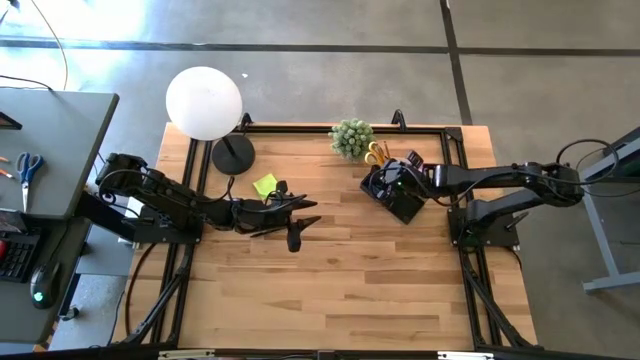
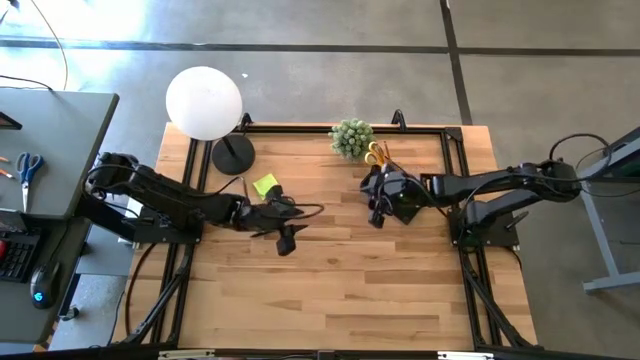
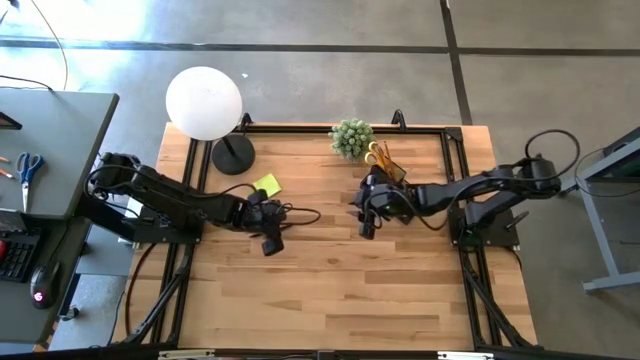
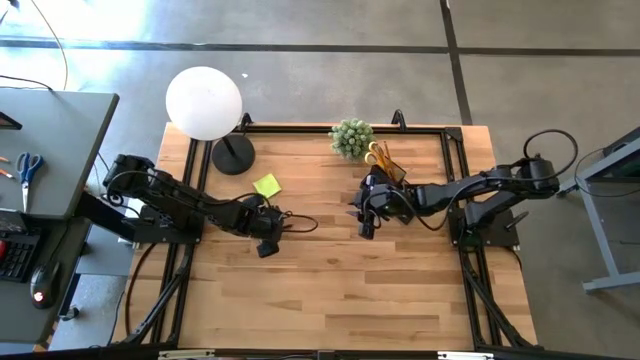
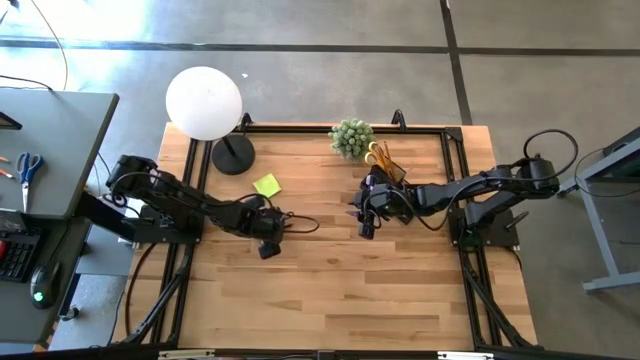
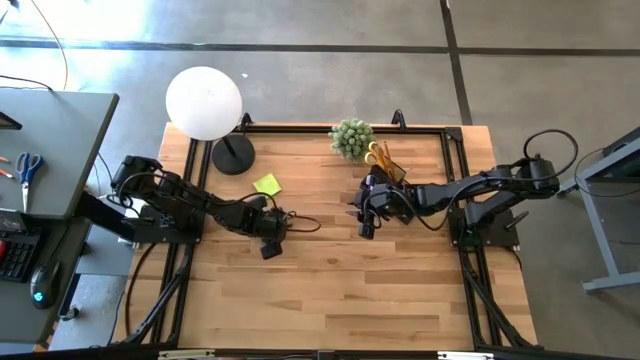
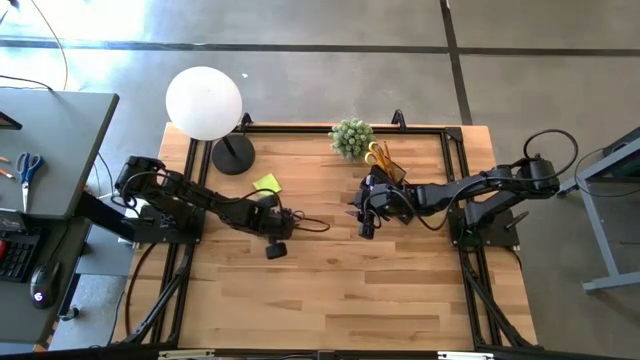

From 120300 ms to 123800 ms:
Task: Pick and place office supplies into organizer
Put the black pen into the desk organizer

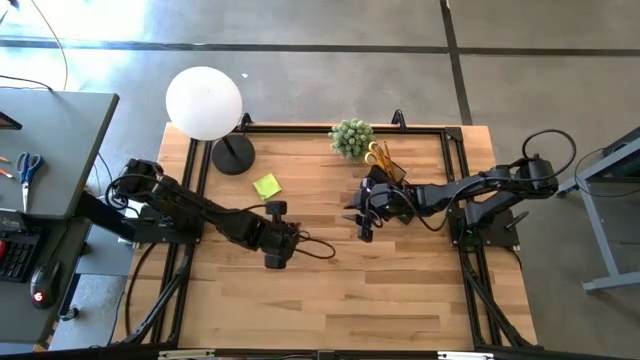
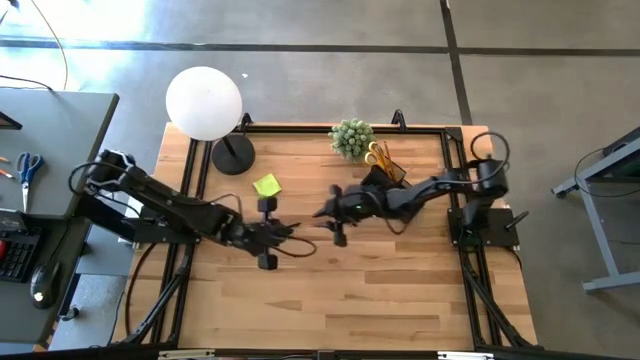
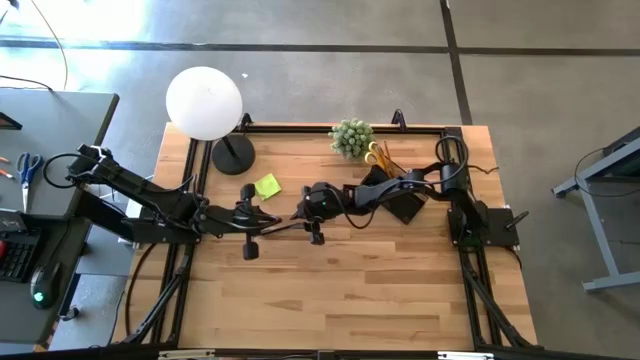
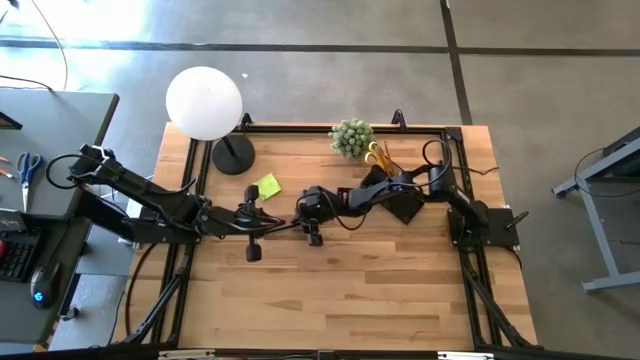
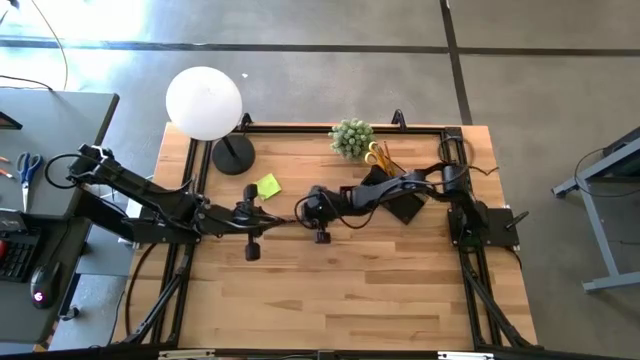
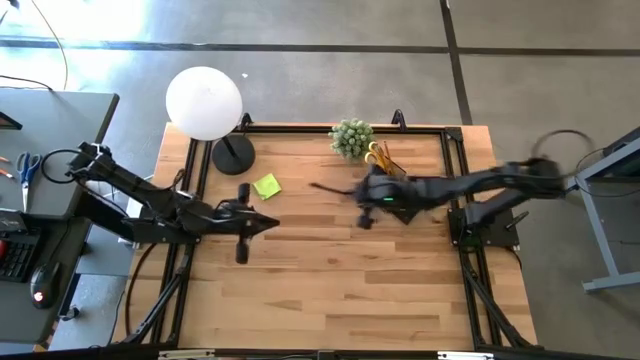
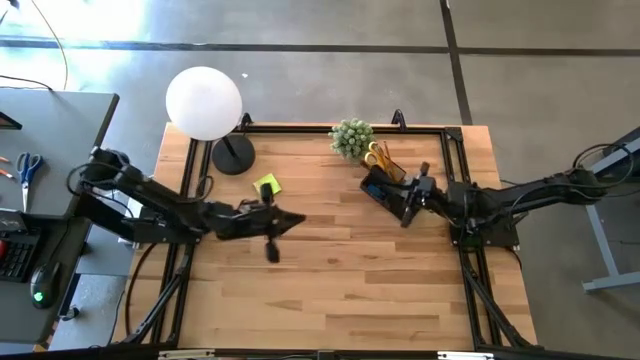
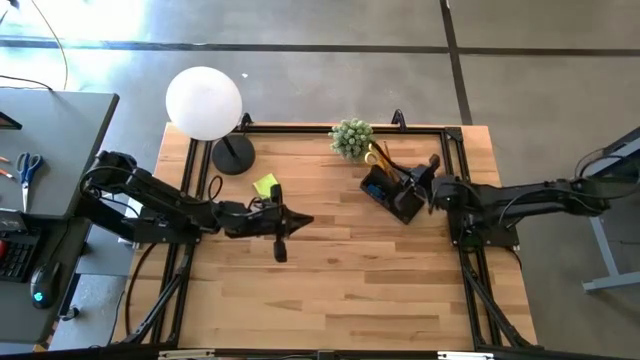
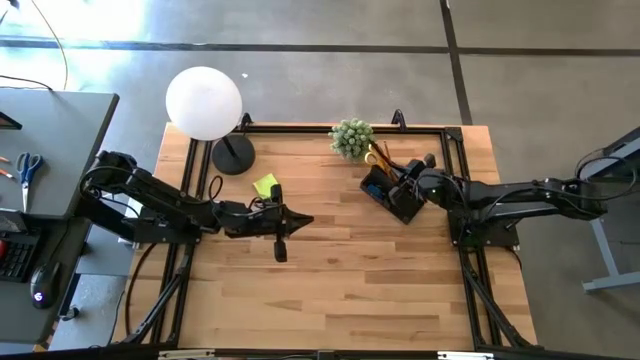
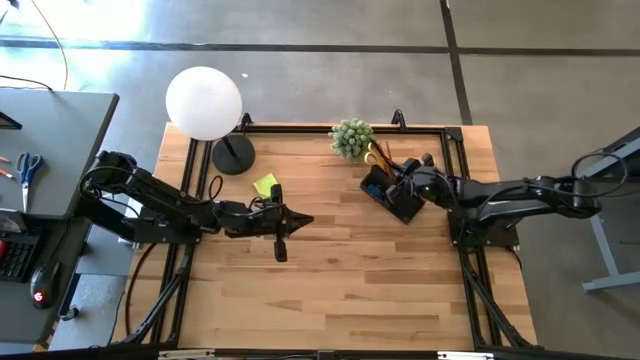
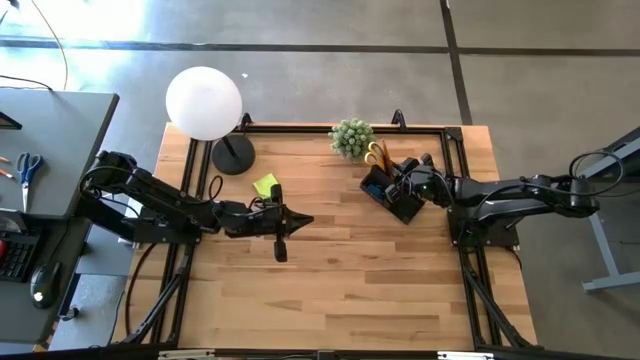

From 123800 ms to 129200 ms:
Put the black pen into the desk organizer

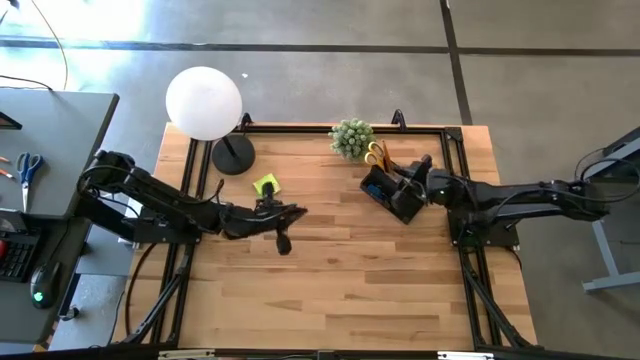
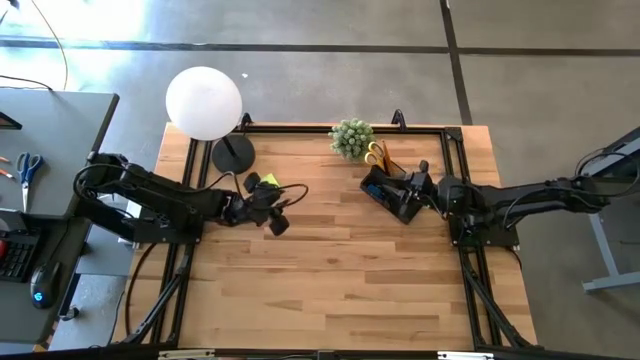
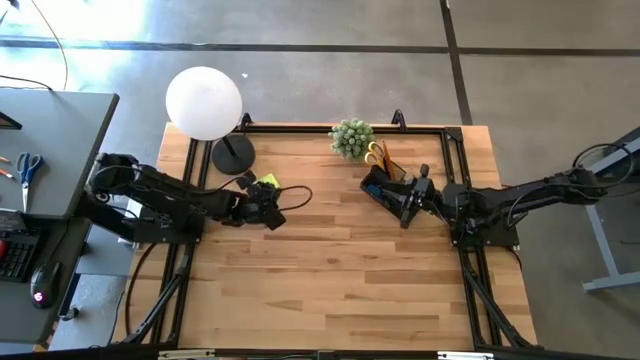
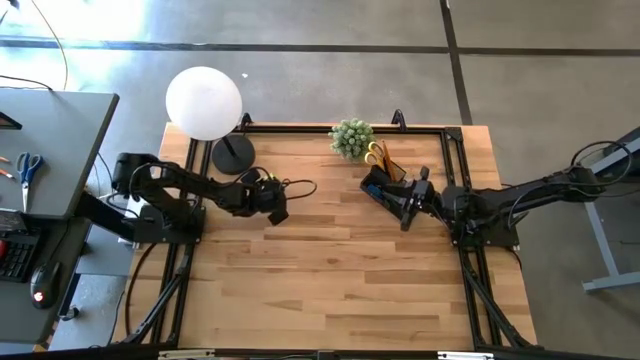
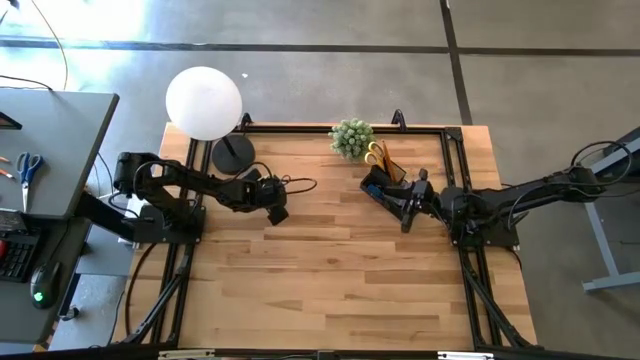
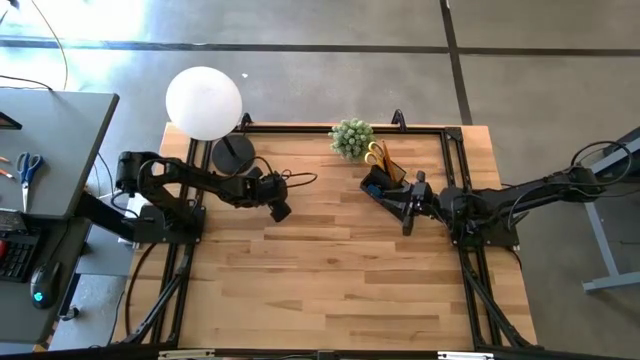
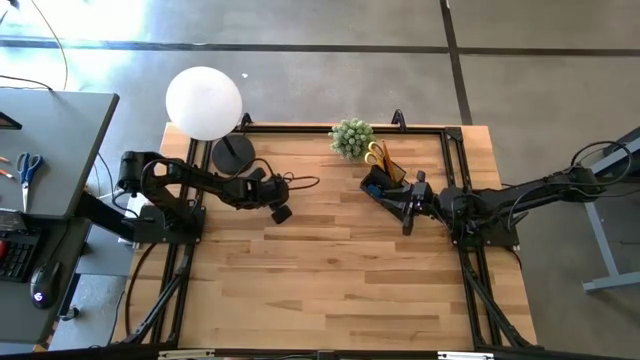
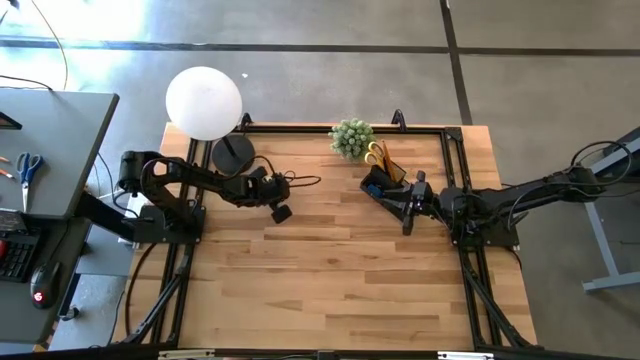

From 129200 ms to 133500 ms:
Put the green sticky notes into the desk organizer

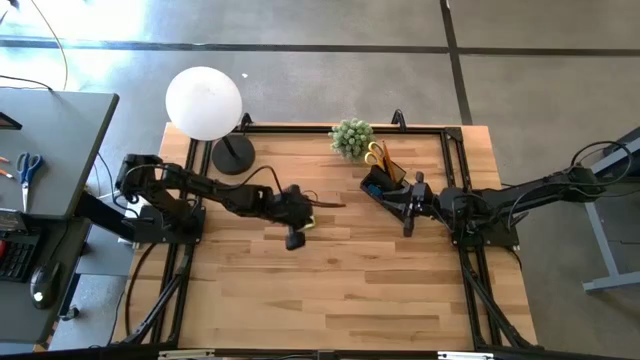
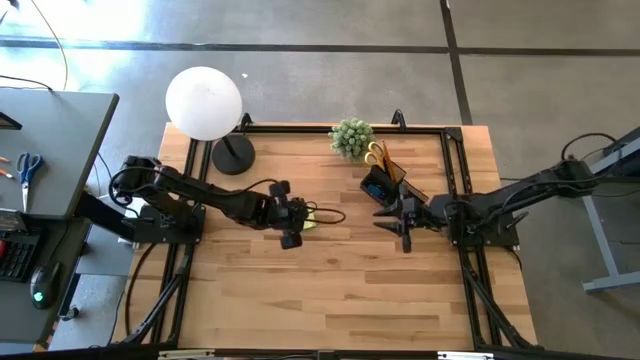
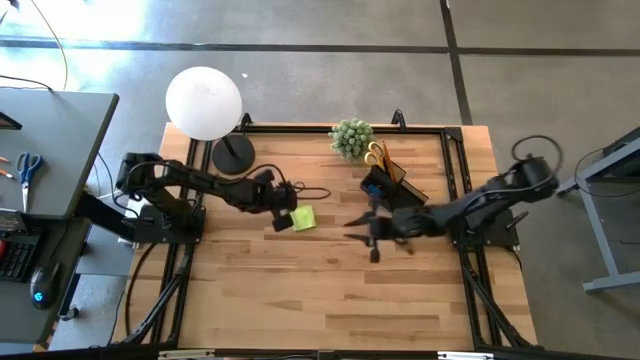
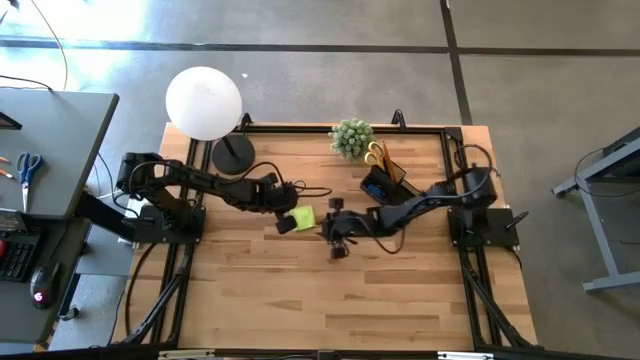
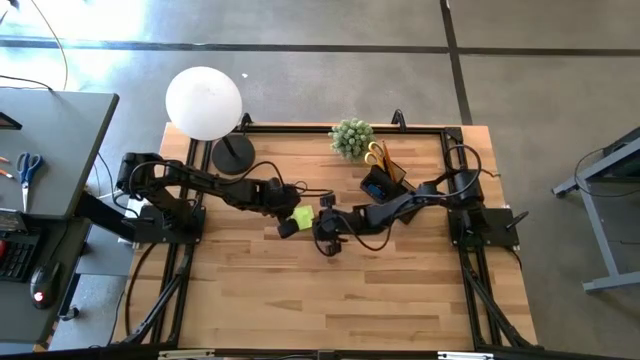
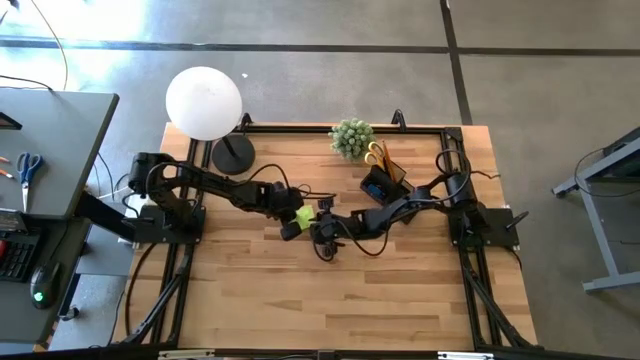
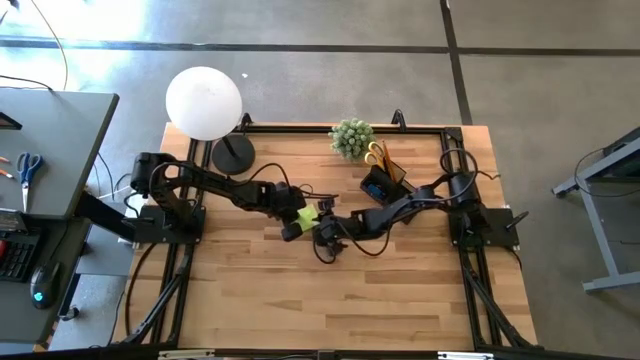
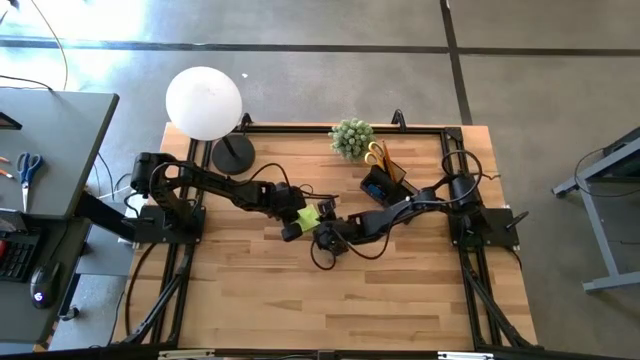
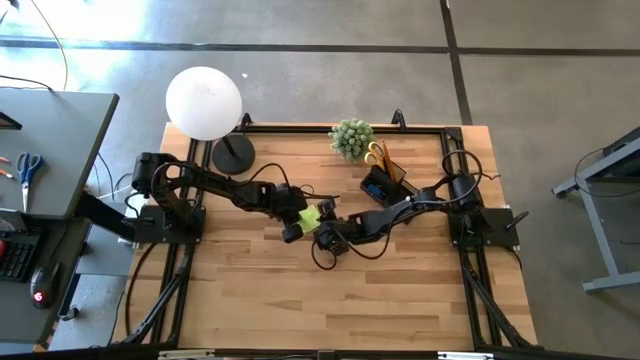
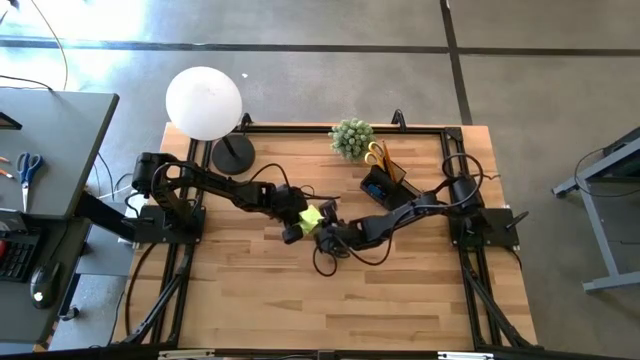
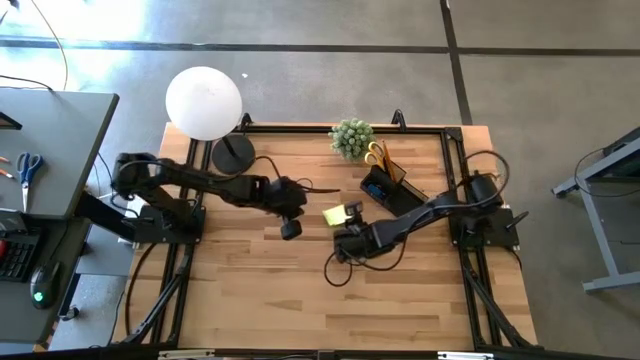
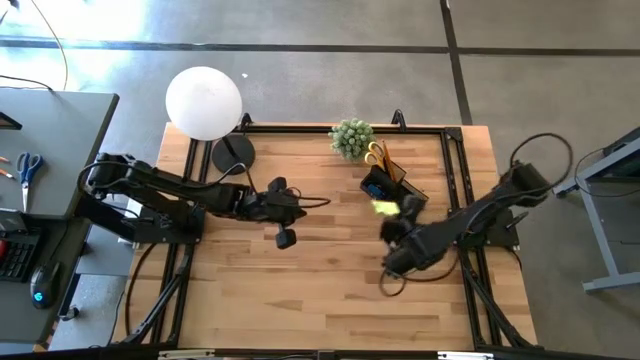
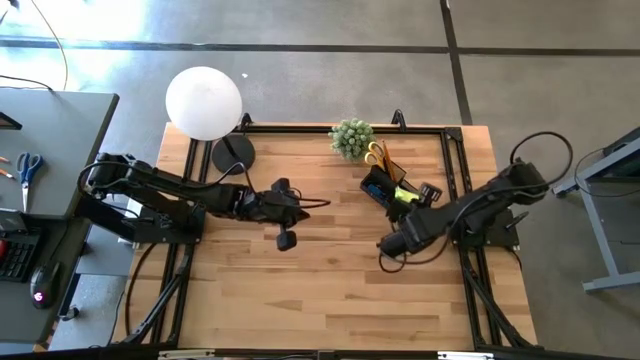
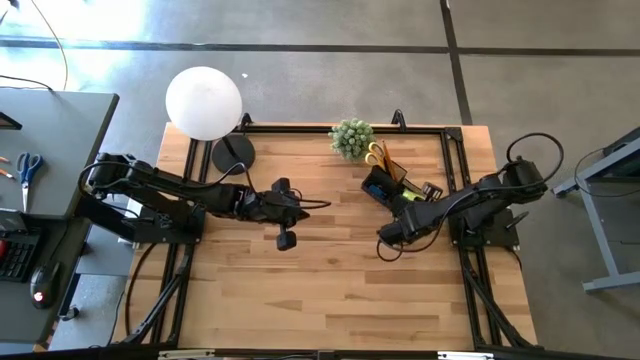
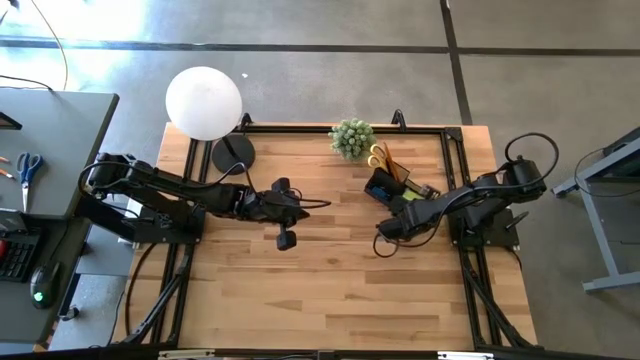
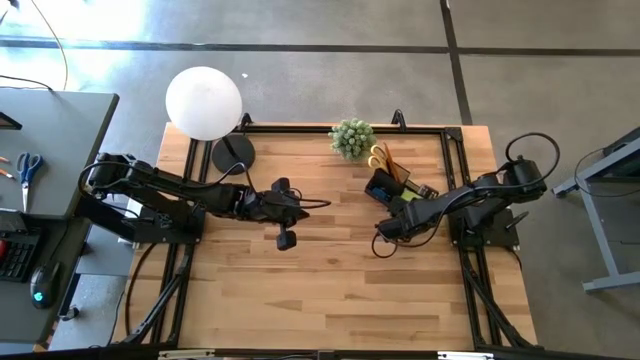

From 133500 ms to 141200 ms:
Put the green sticky notes into the desk organizer
